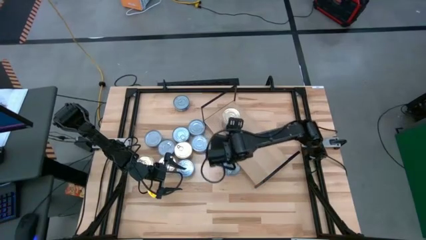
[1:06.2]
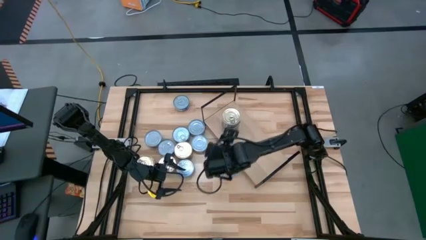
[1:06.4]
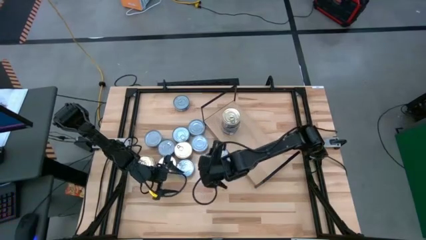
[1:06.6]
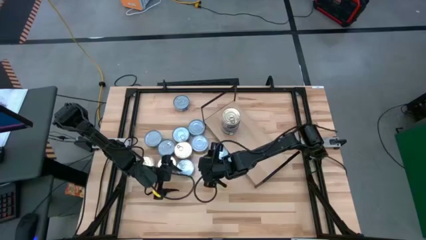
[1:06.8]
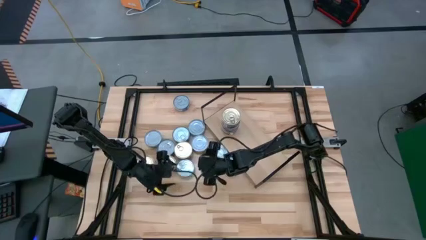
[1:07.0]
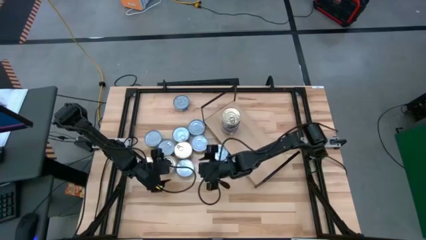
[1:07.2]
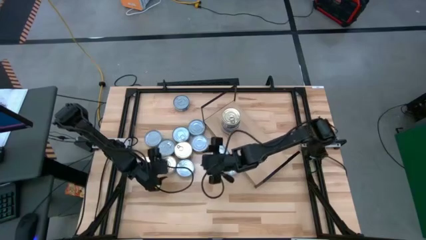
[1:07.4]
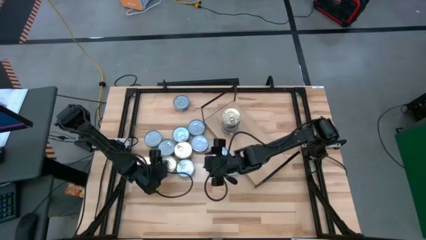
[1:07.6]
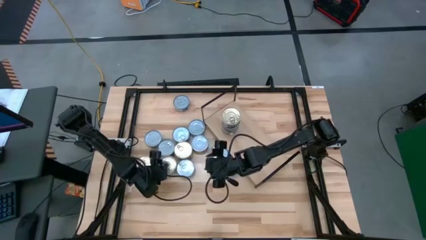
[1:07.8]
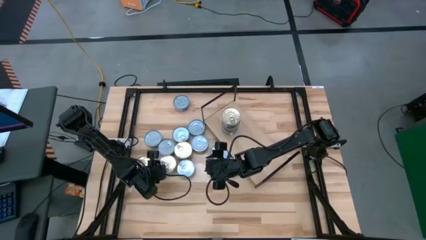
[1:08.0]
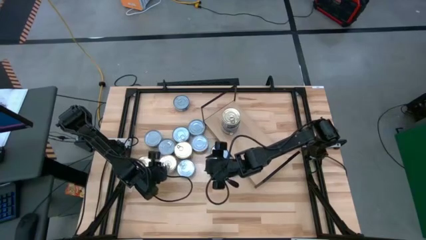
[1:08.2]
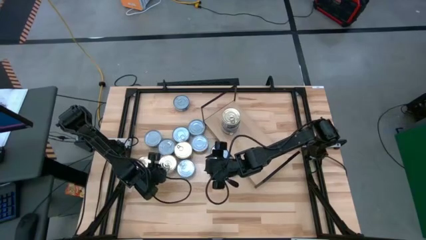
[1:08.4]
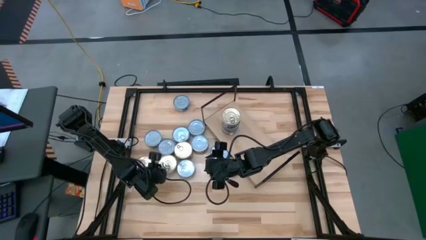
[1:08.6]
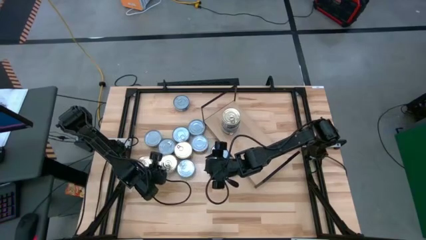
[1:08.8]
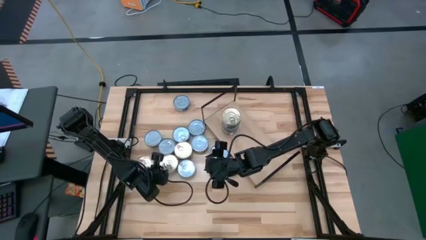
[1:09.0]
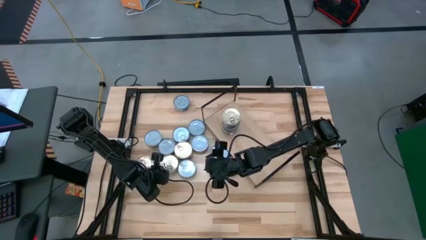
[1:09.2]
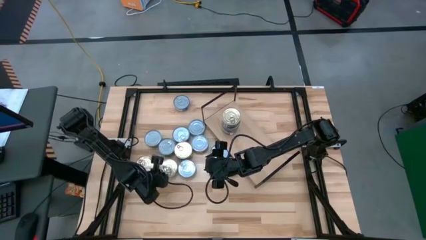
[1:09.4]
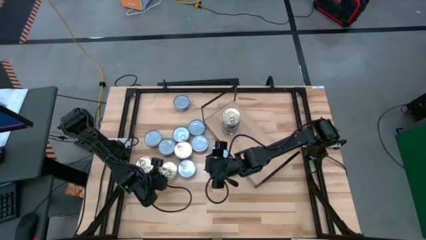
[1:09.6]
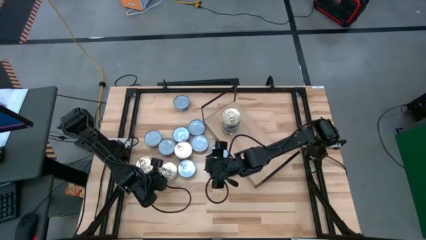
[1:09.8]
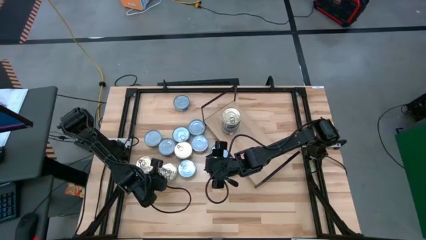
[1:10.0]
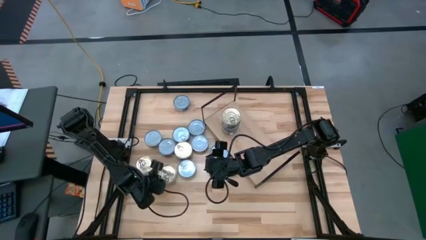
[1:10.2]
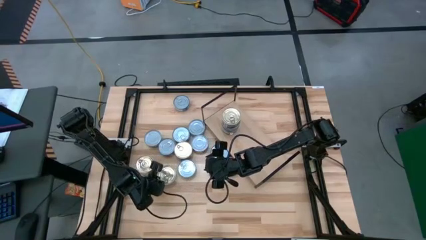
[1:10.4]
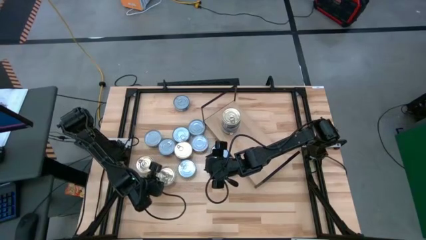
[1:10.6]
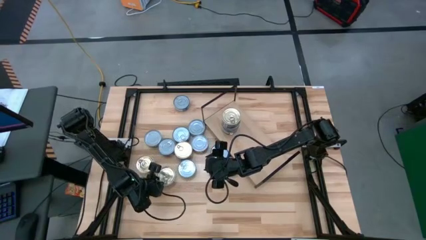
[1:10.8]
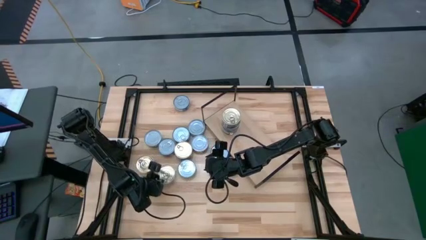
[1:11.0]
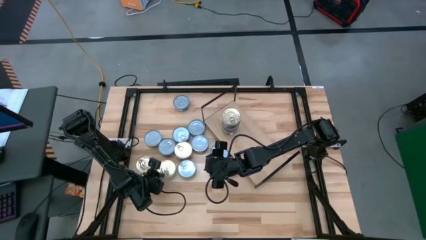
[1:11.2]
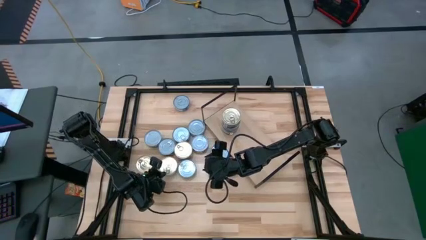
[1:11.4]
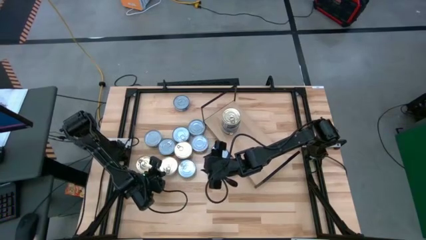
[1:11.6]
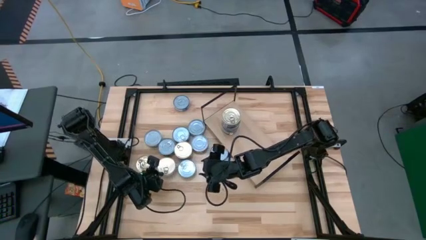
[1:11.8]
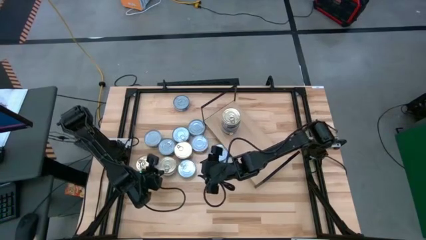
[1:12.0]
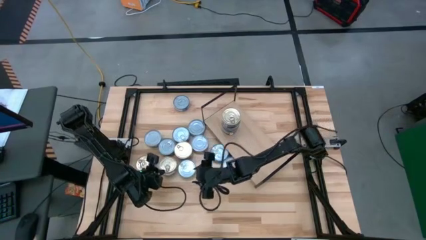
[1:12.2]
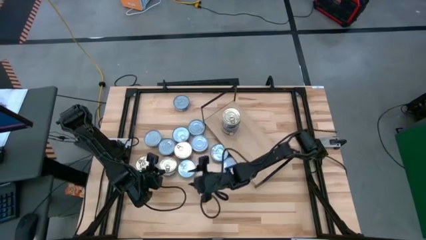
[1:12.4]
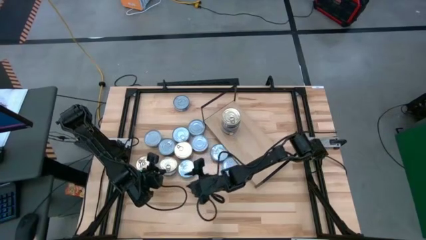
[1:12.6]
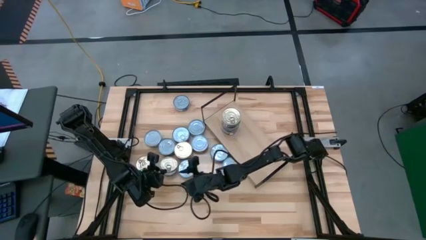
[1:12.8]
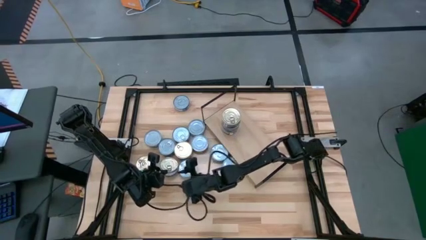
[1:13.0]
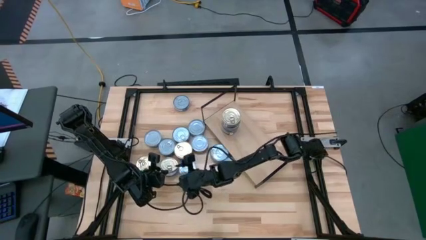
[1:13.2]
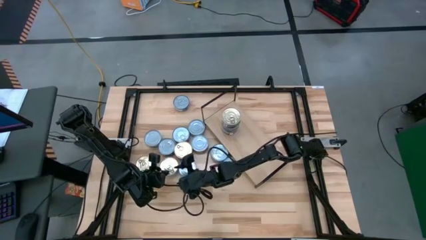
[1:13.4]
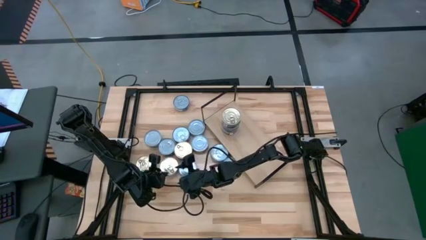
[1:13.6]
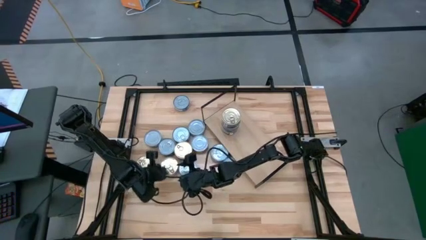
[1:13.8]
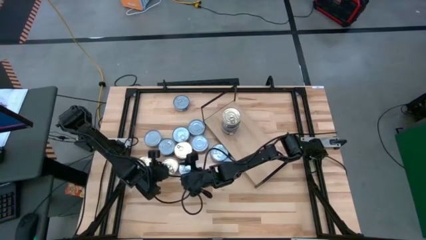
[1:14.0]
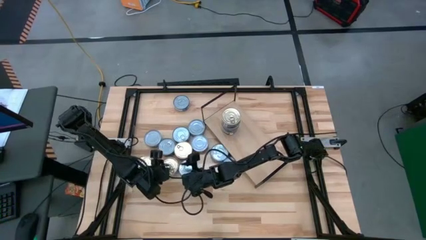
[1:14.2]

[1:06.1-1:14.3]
Task: Stack canned seafood by type on shelf
Stack the blue tuna can on top of the blue tuna can

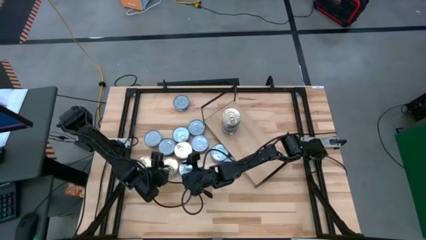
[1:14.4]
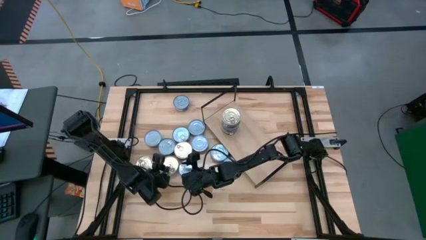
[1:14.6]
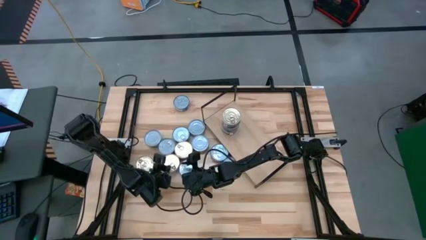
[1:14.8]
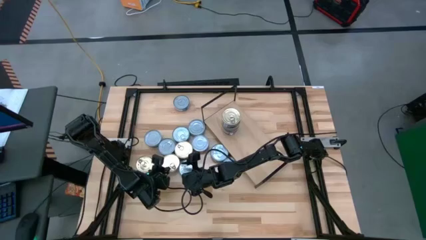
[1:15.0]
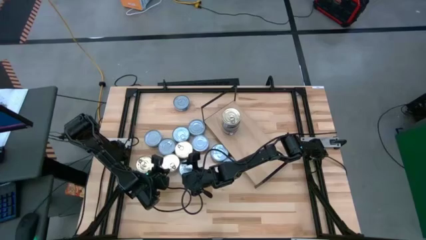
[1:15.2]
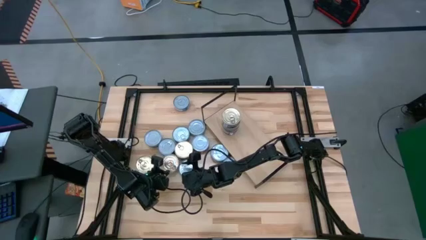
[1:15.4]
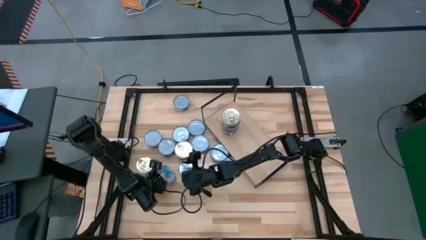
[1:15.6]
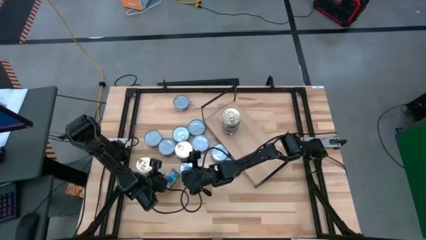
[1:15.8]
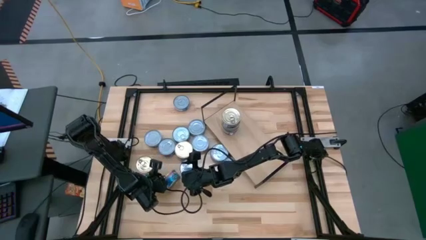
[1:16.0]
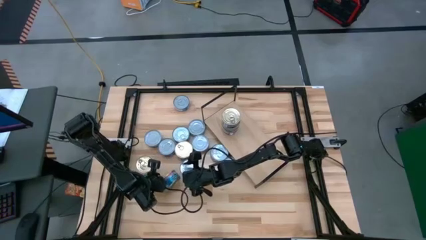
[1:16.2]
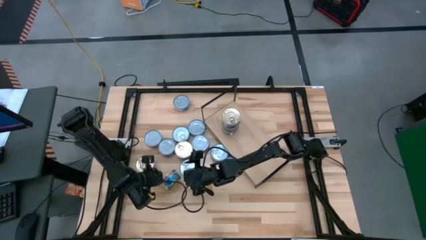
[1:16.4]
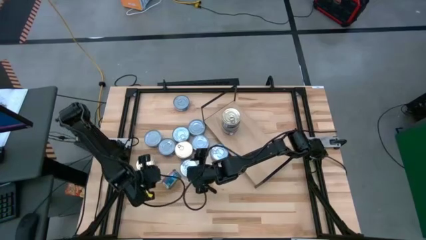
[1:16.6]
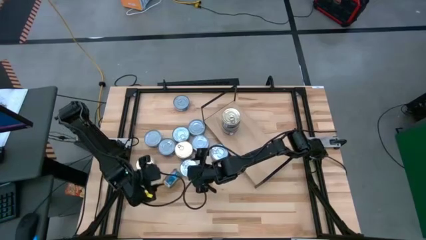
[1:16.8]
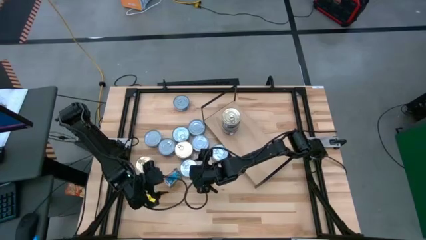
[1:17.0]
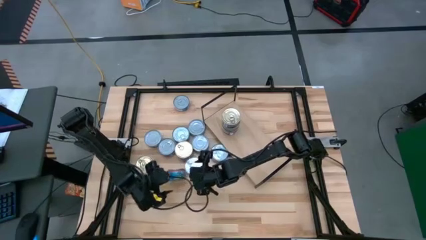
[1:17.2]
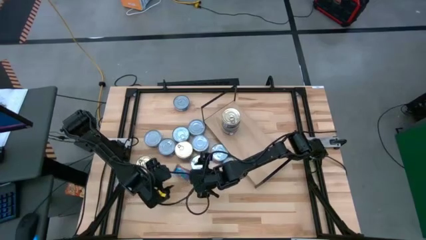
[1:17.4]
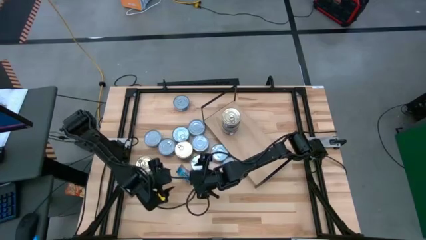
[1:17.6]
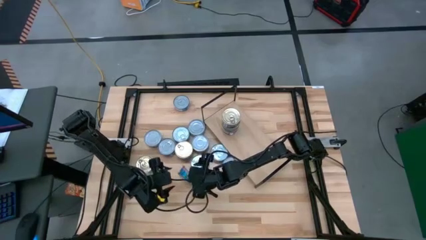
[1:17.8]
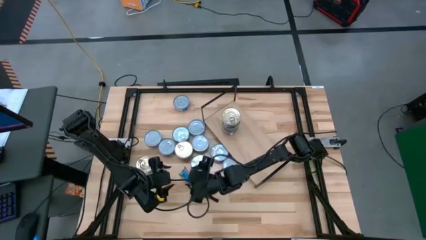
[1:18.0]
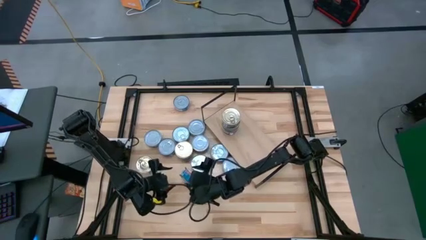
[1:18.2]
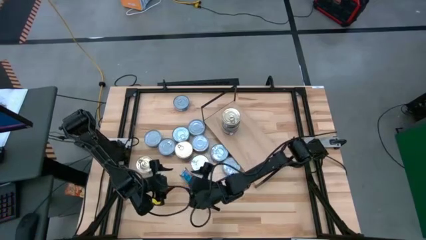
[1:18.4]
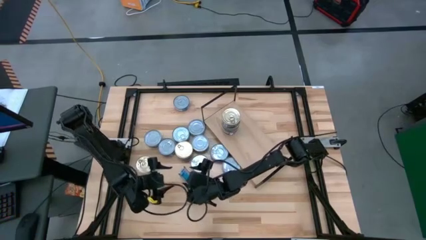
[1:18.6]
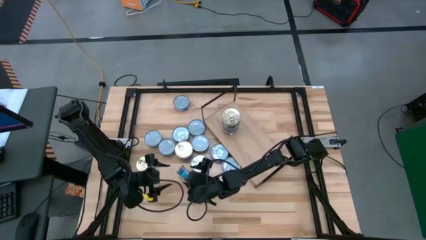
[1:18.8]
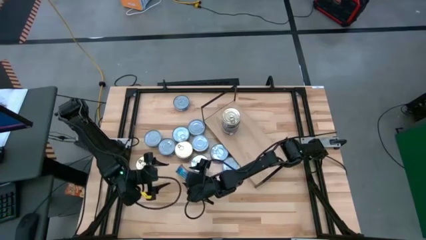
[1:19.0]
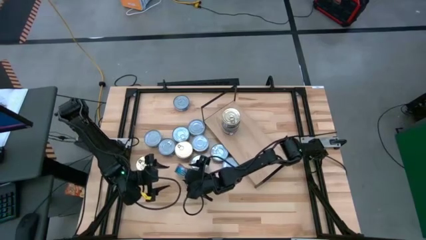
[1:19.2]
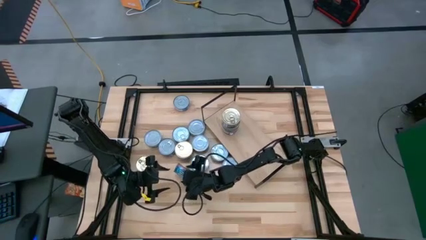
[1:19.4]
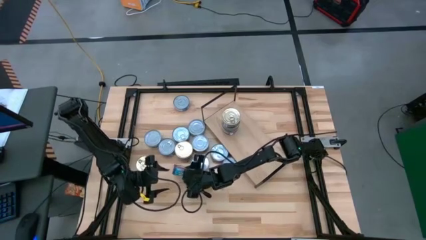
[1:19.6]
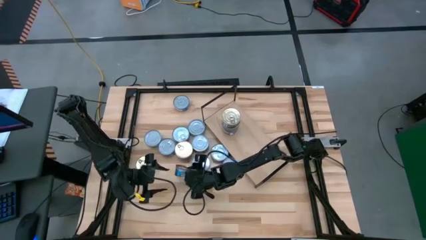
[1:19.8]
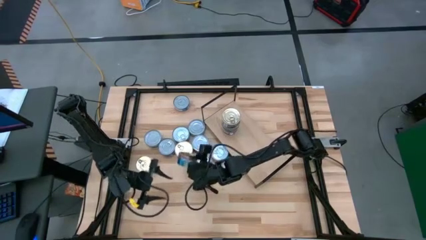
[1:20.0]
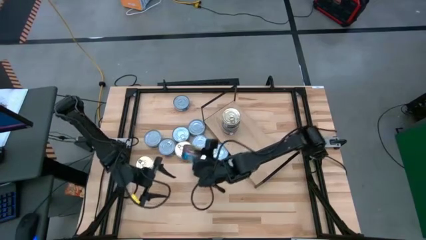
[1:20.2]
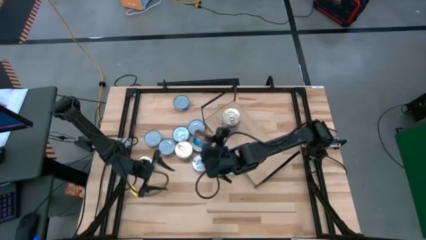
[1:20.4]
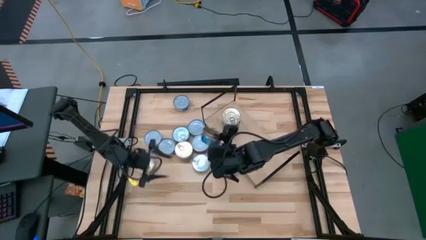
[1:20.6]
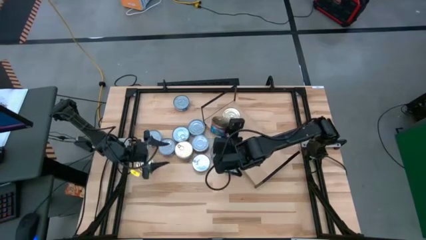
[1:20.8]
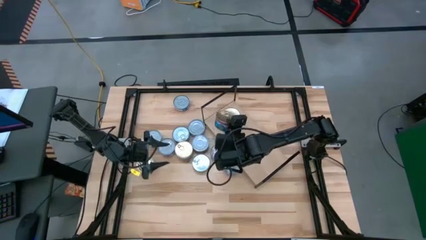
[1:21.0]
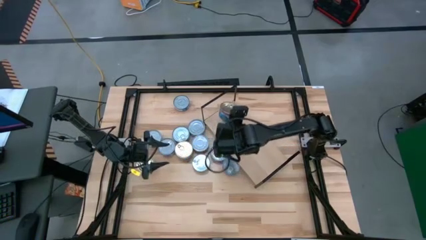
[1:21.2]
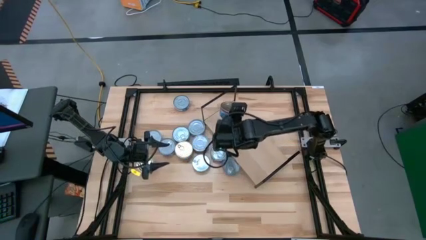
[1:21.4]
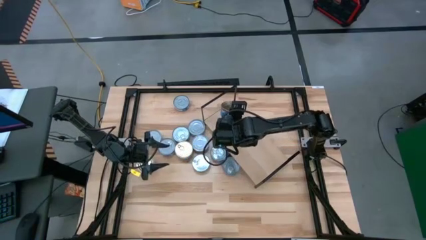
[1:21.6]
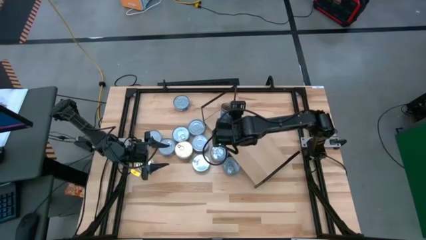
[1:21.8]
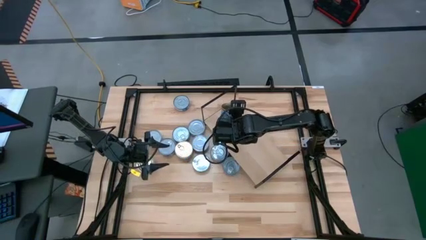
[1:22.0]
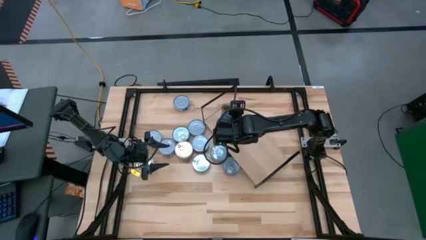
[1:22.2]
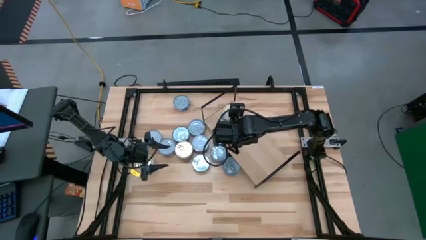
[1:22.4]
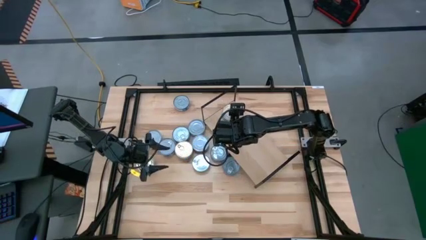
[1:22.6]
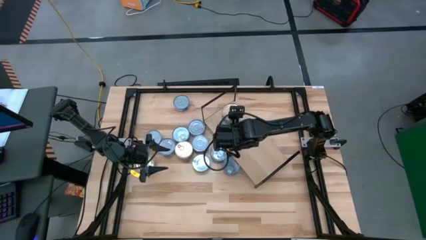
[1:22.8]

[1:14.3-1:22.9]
Stack the blue tuna can on top of the blue tuna can on the shelf
